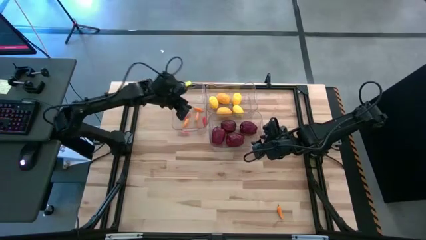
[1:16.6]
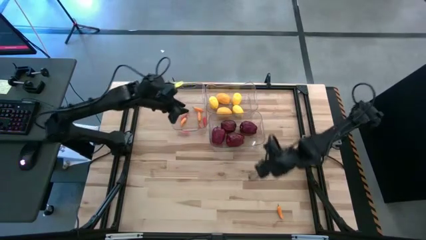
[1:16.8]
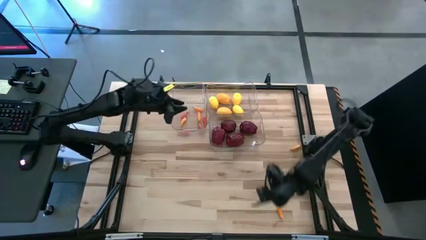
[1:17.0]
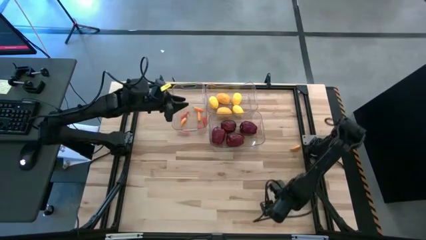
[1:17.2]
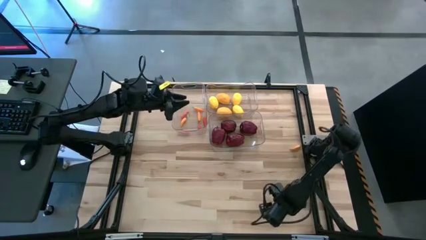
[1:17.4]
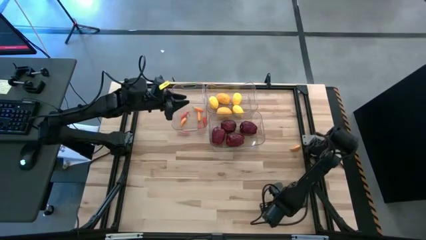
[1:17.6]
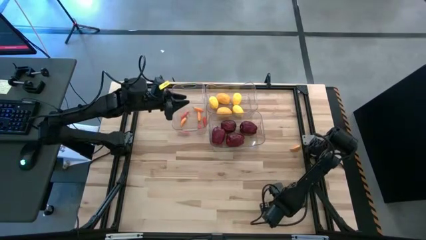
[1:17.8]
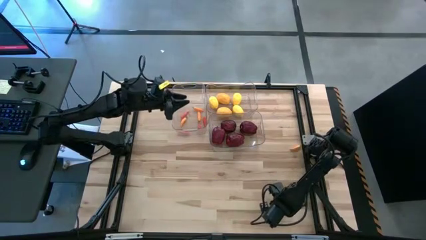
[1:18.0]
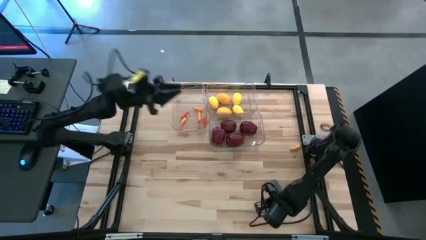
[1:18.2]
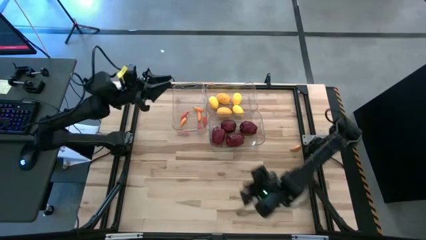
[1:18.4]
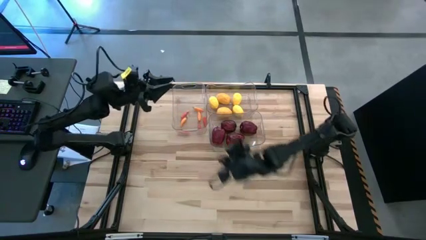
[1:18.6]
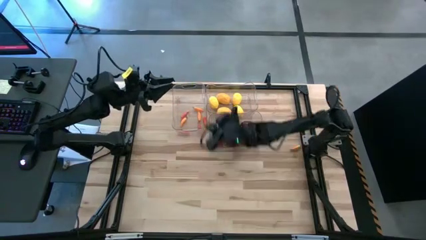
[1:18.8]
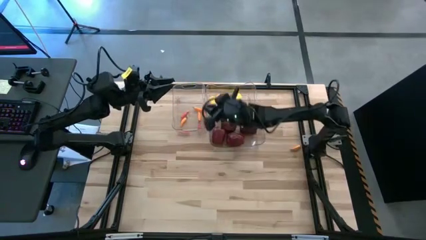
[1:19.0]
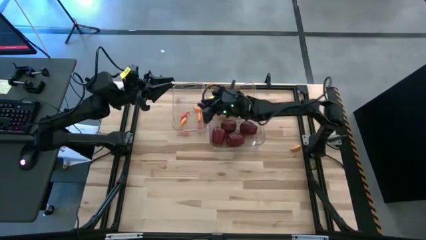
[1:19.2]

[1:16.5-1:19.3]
Task: Sort produce into baskets
Put the orange chili pepper into the top left transparent bin

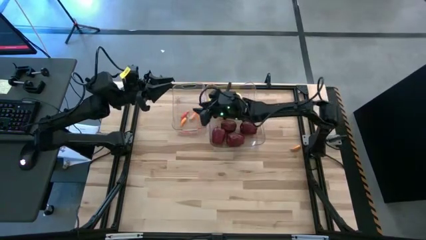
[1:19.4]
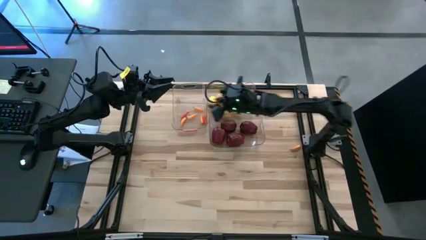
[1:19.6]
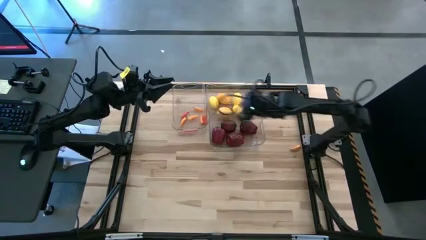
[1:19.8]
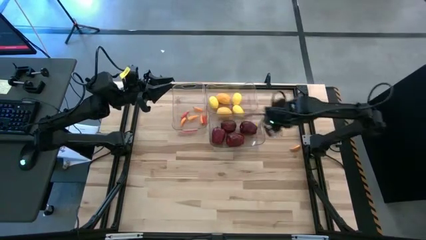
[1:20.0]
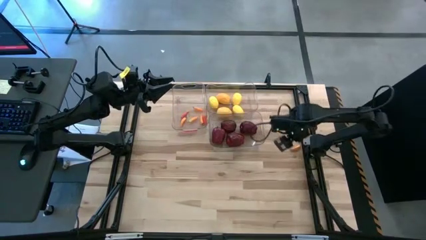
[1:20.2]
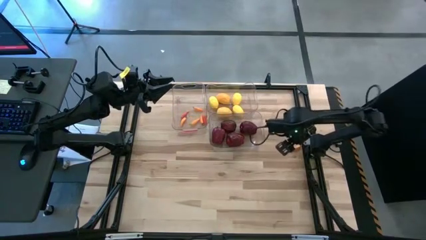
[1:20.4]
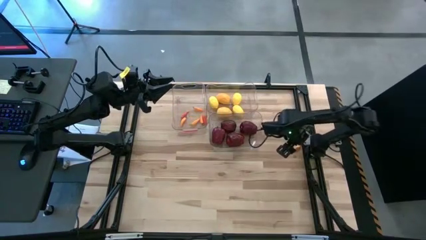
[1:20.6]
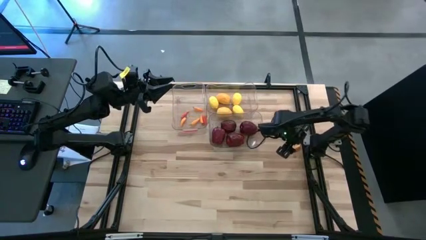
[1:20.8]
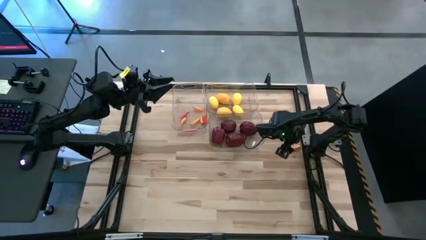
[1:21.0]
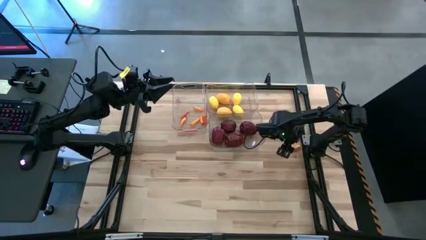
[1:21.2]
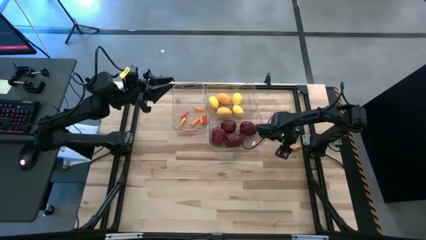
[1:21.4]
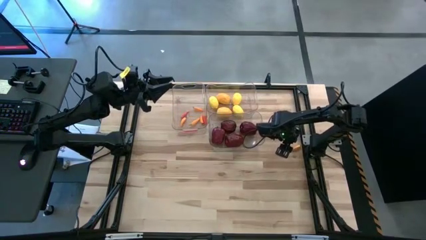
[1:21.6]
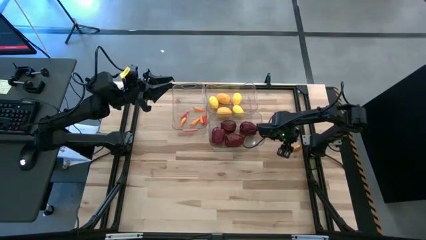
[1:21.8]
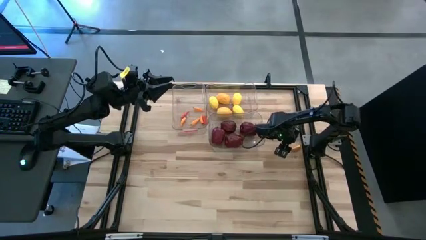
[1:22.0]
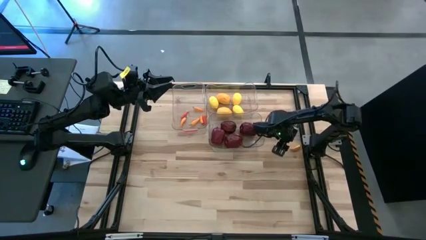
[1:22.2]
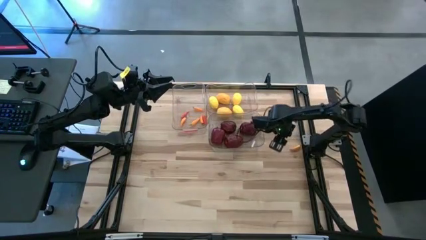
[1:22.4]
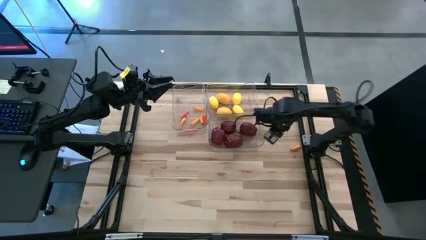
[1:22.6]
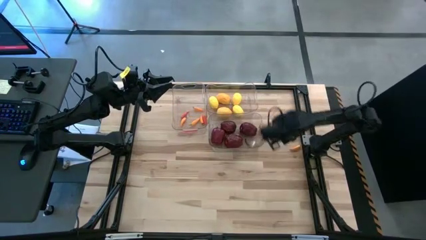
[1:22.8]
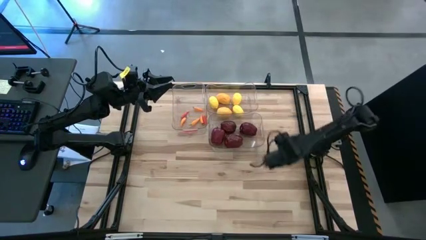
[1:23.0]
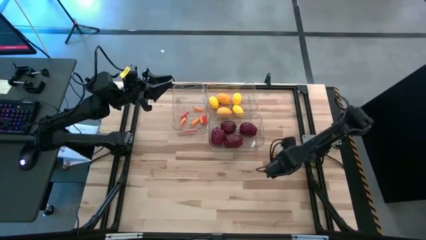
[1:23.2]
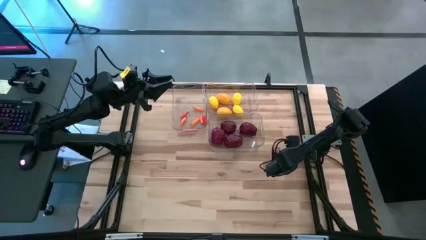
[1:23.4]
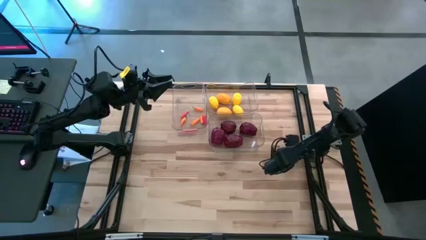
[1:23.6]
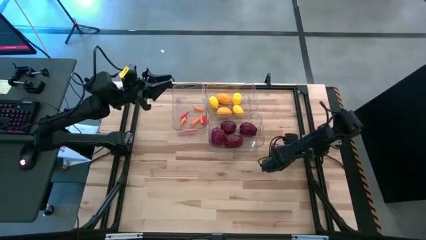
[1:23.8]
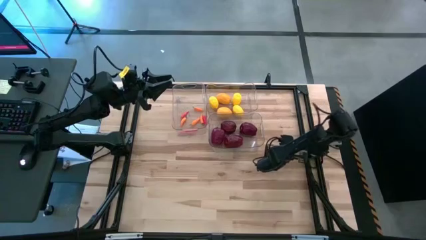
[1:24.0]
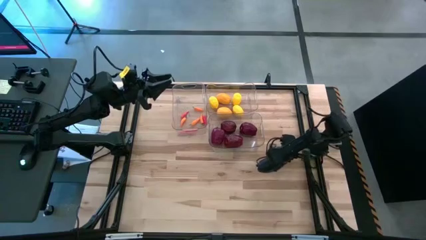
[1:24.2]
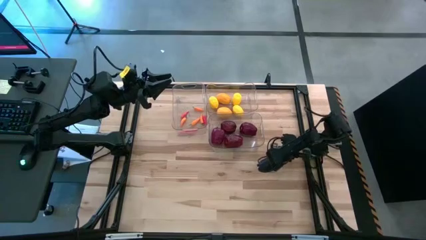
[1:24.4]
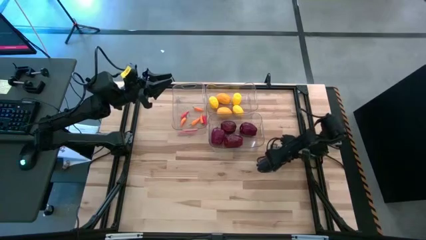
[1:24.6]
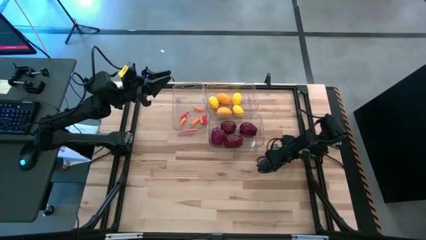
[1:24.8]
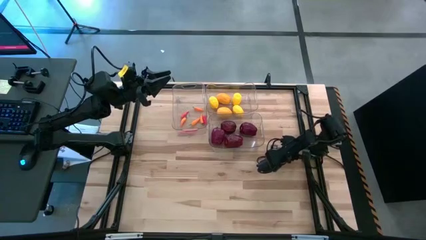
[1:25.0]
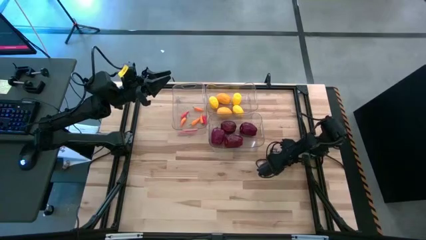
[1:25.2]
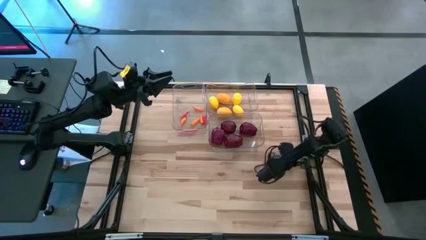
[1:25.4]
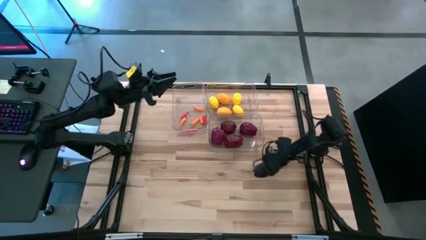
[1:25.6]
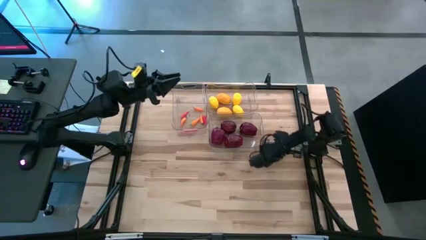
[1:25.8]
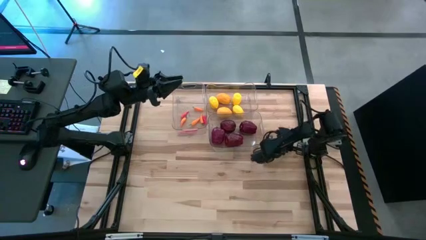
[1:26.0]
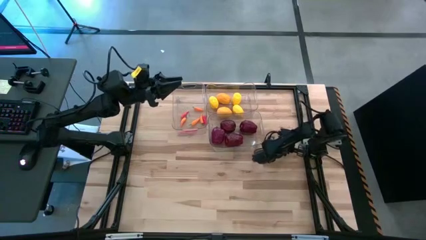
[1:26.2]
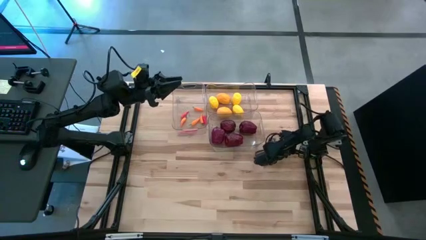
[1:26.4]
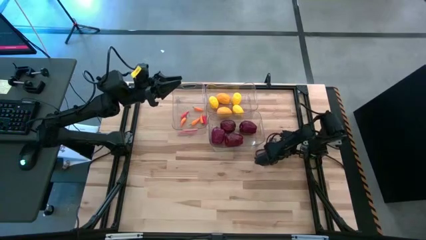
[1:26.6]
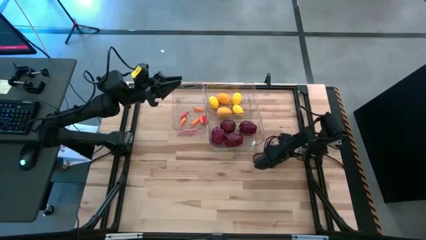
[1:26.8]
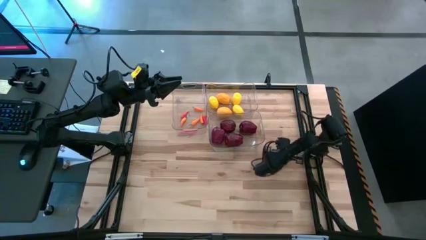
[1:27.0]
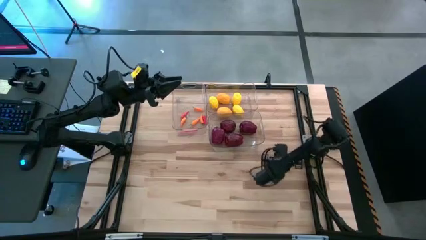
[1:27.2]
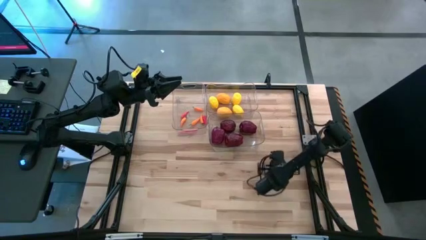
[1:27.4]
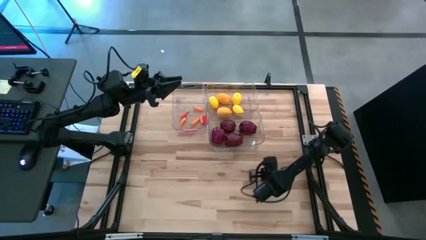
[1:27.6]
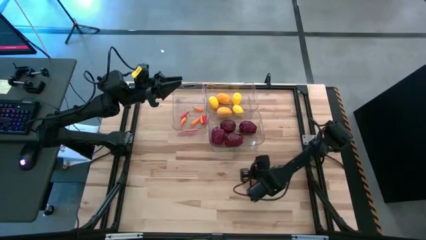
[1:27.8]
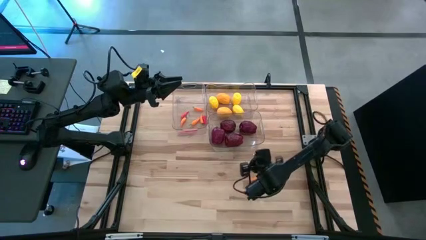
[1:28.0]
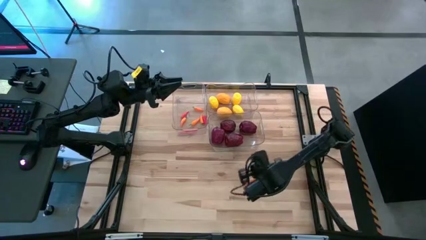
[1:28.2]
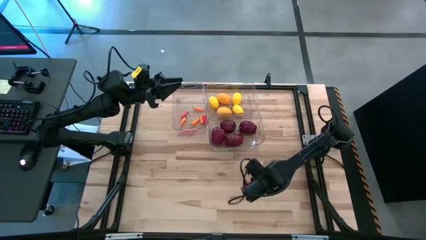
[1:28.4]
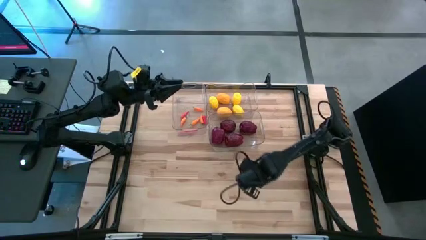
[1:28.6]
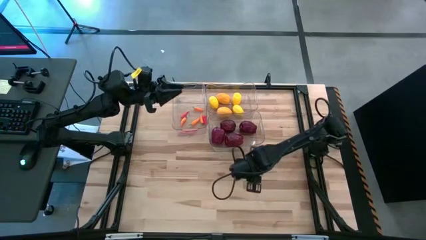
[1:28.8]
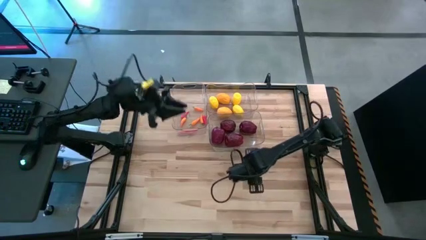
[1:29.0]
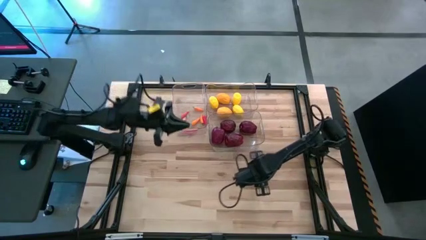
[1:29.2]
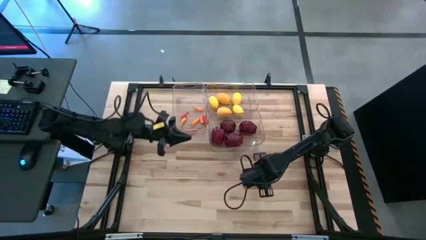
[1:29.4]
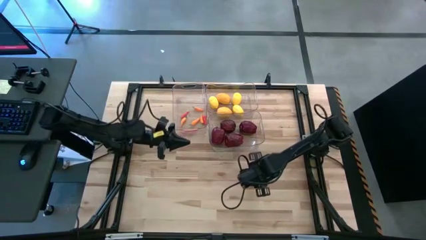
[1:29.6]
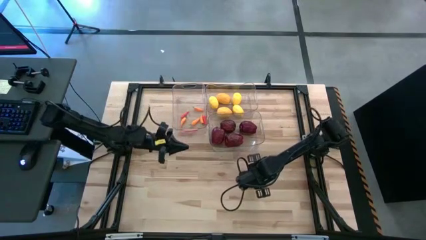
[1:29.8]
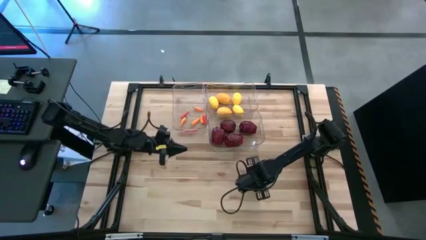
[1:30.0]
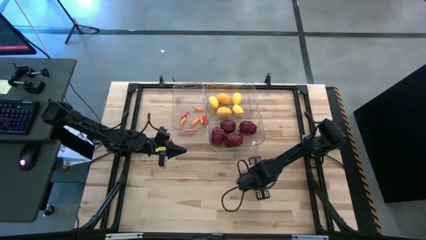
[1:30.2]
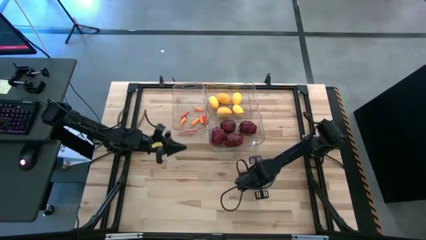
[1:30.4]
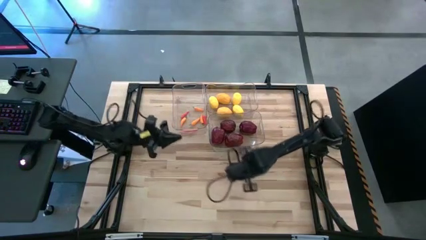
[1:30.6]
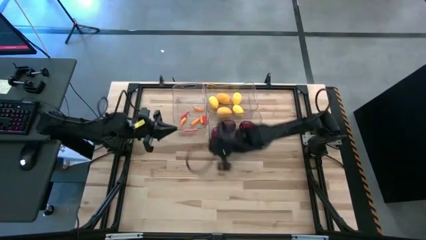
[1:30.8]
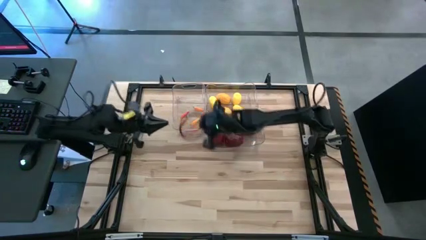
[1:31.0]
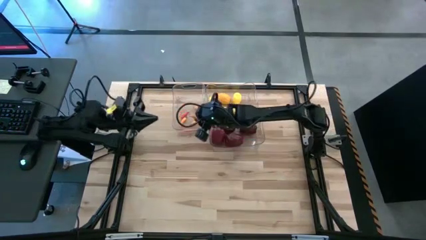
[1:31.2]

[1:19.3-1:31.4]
Put the orange chili pepper into the top left transparent bin

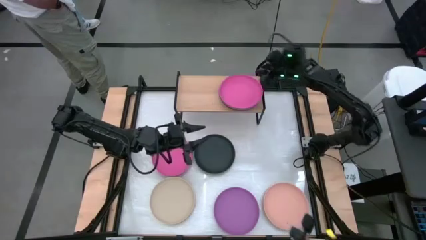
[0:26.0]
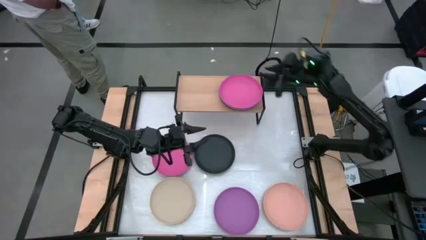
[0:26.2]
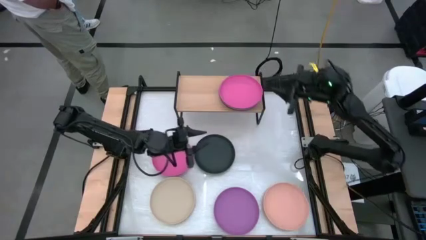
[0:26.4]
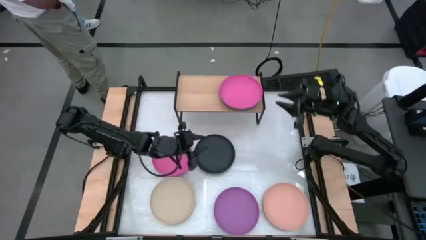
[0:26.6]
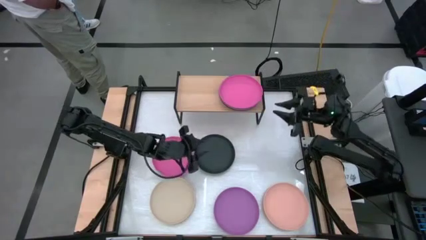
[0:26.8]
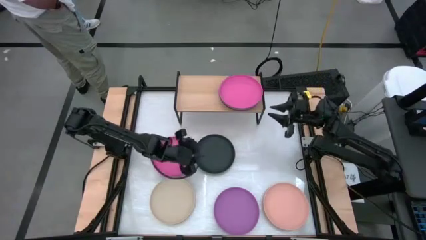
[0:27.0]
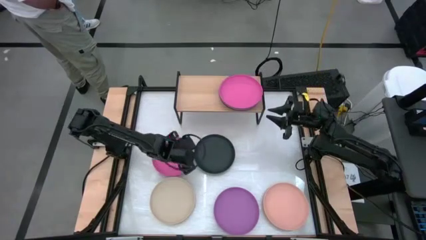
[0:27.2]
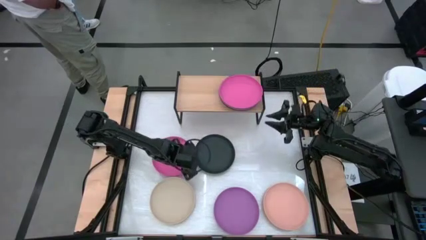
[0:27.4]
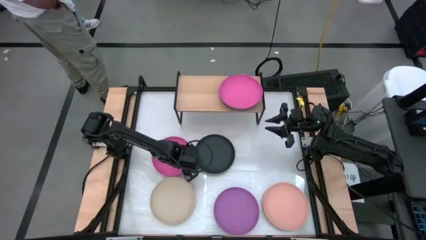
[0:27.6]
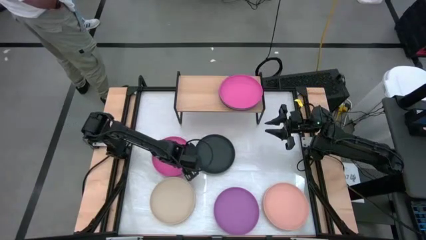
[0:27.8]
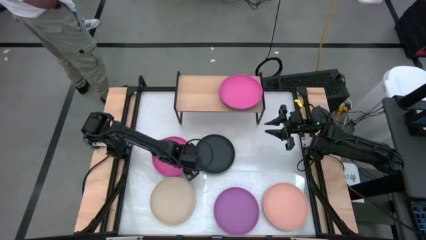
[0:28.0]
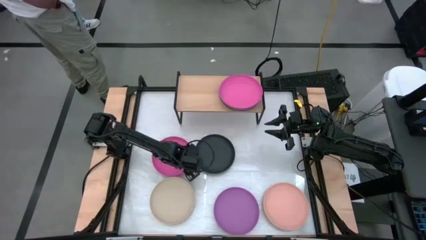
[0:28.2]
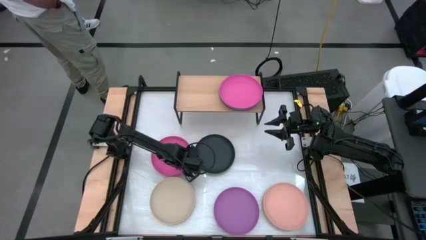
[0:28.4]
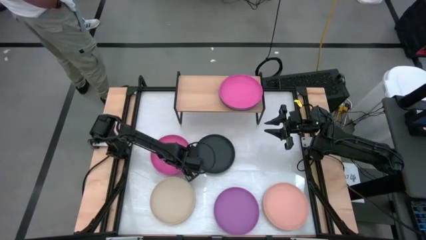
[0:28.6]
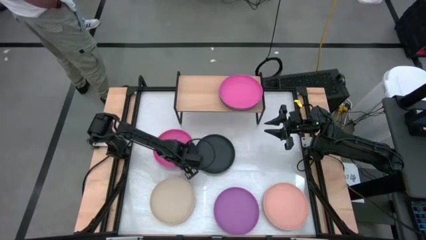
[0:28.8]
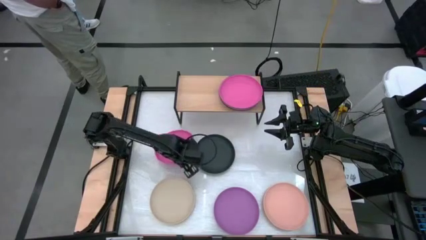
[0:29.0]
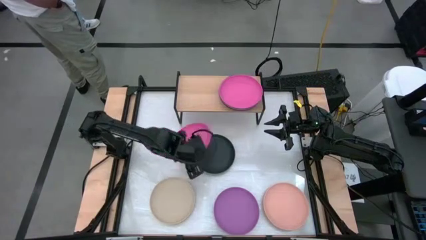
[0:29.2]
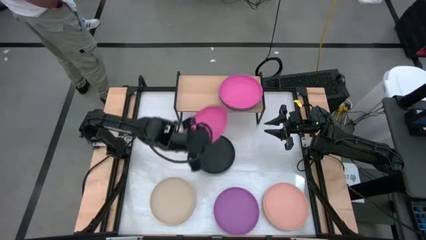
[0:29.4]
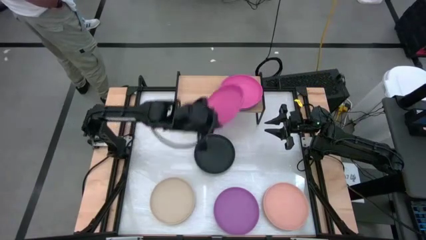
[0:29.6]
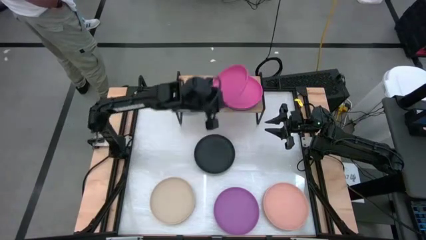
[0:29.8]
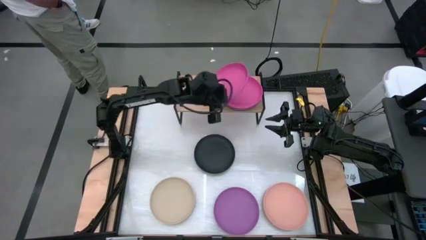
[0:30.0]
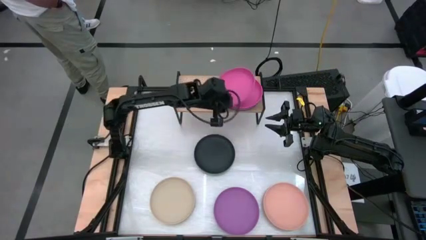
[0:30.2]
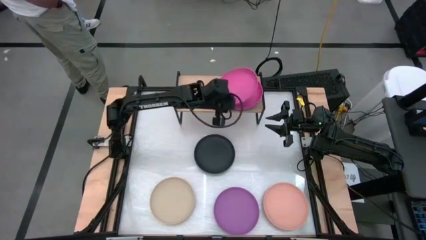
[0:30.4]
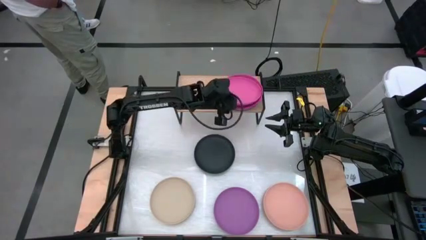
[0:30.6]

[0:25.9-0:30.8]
Task: Place and stack plates onto a shelf
Stack the pink plate on top of the pink plate on the shelf
